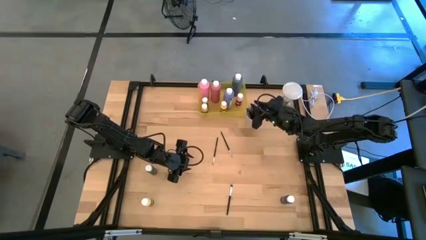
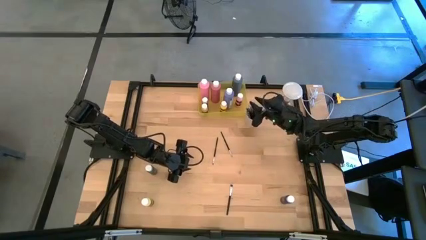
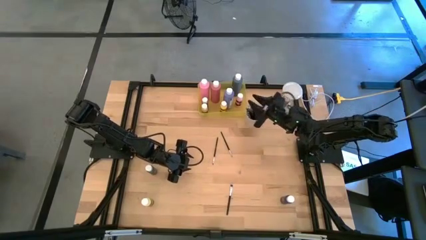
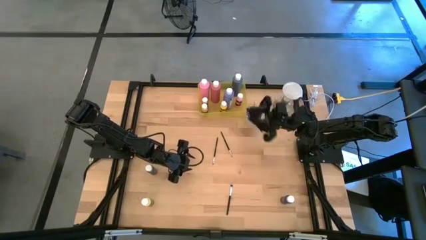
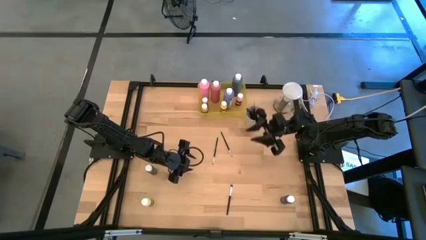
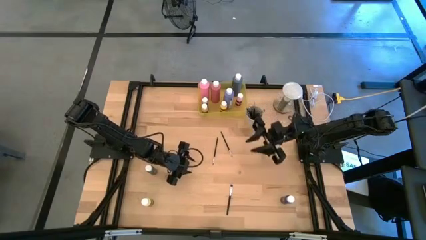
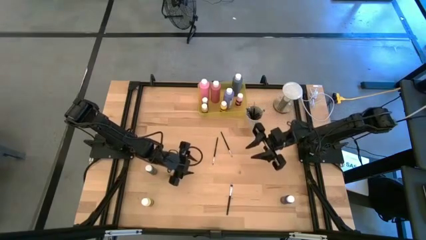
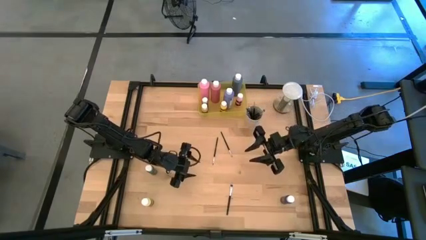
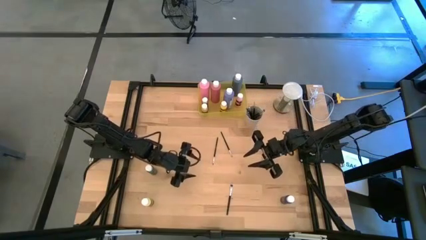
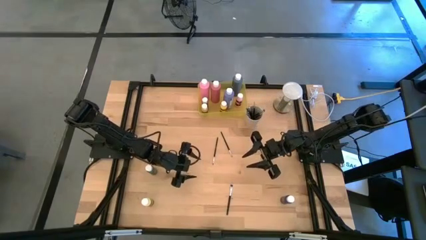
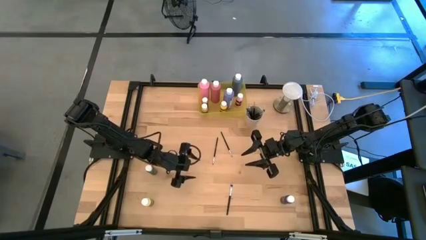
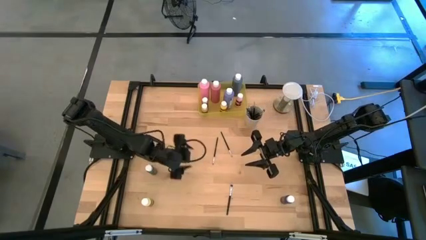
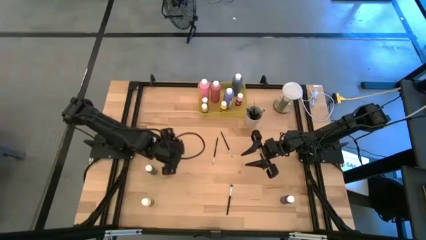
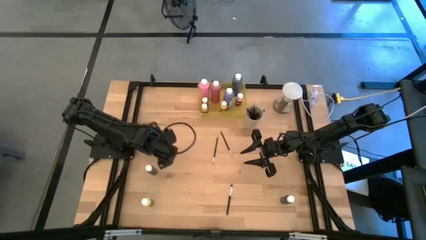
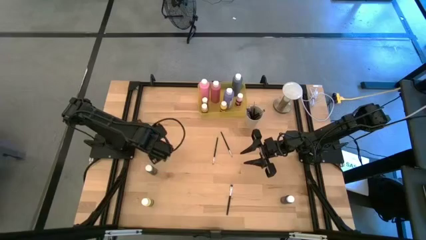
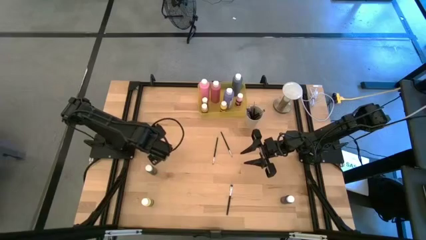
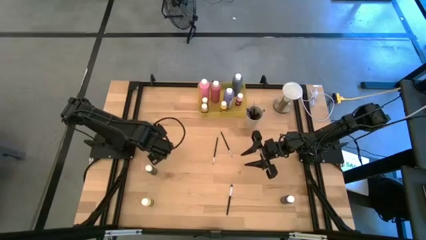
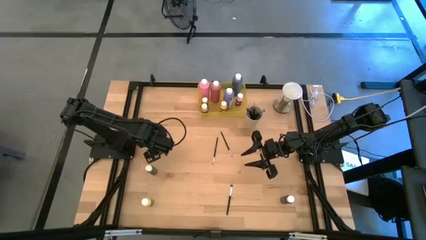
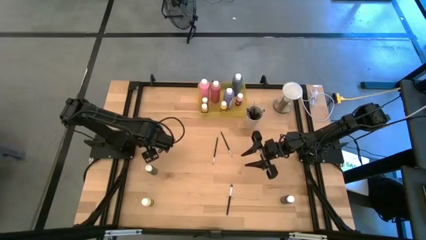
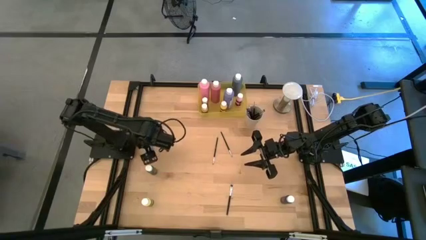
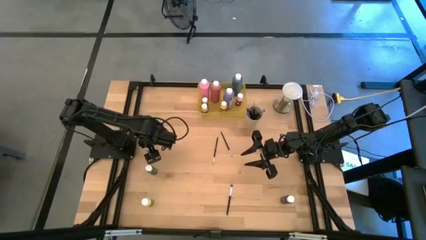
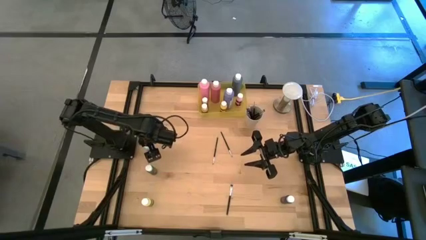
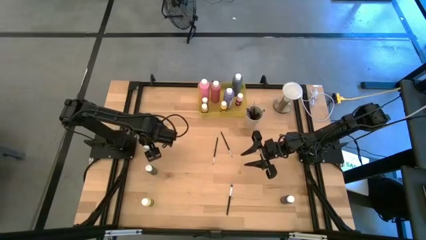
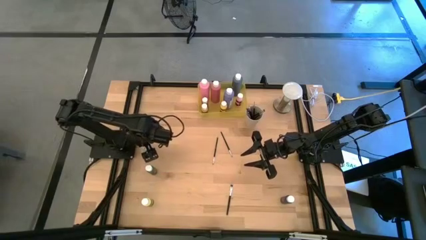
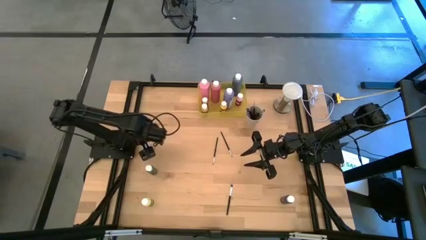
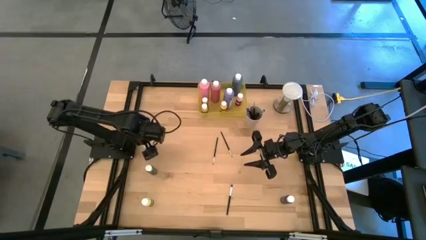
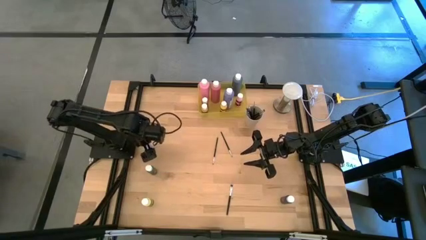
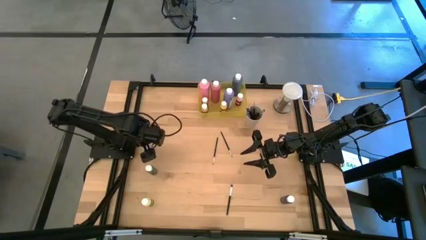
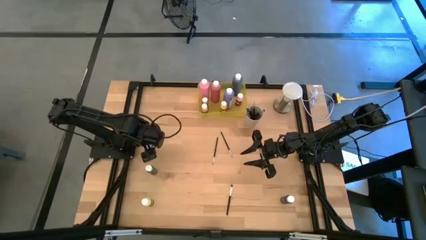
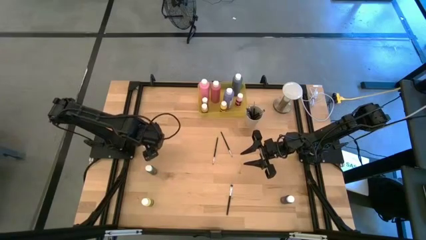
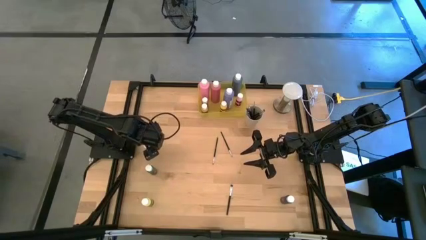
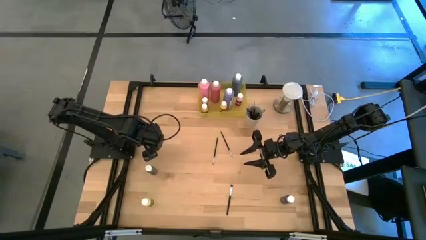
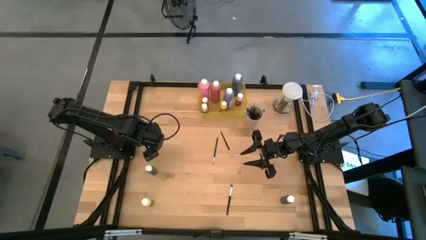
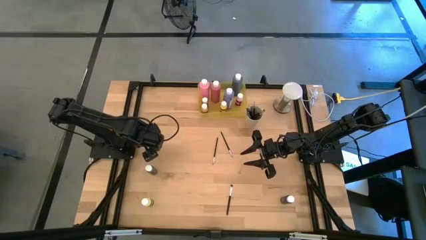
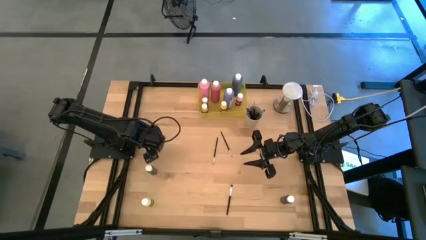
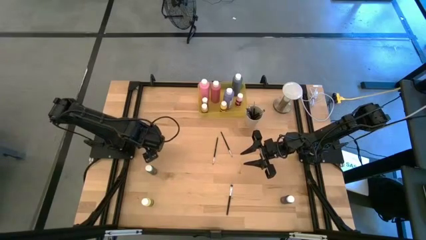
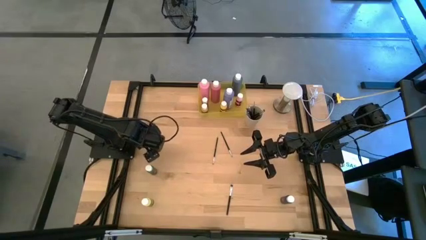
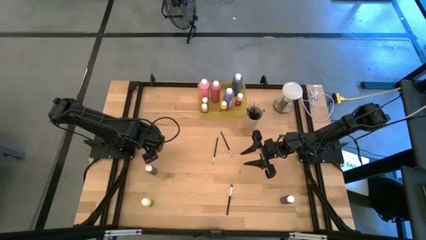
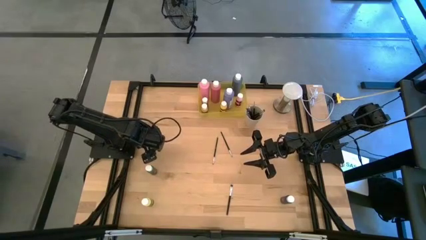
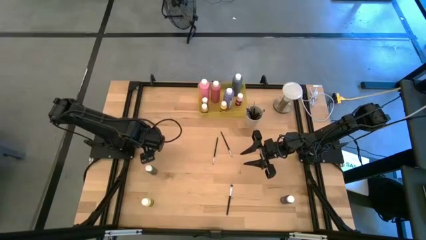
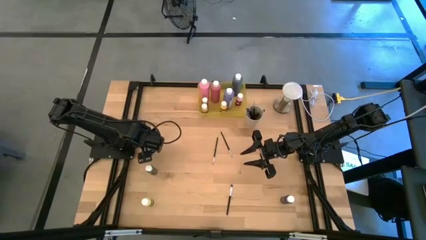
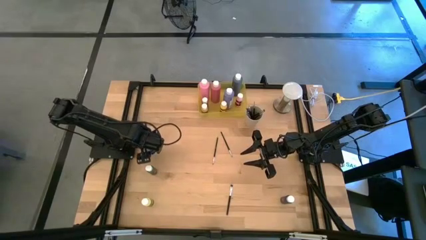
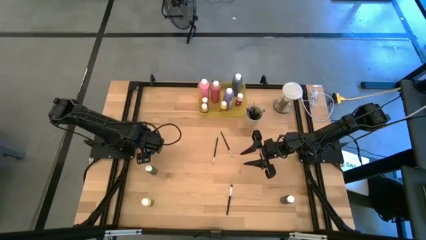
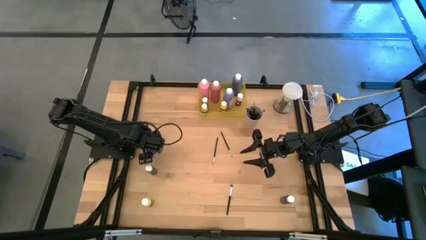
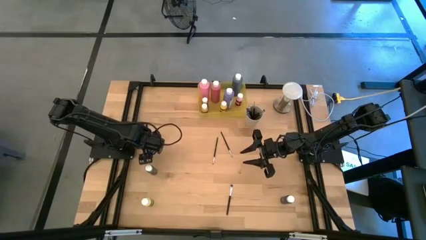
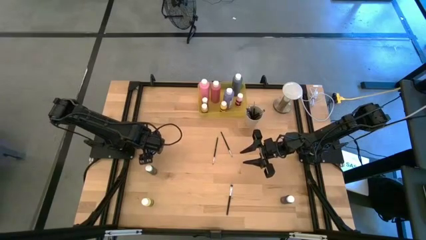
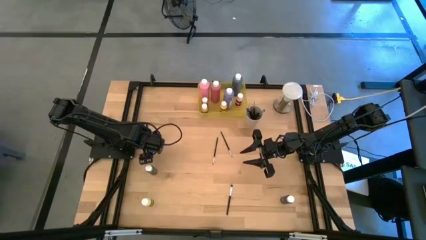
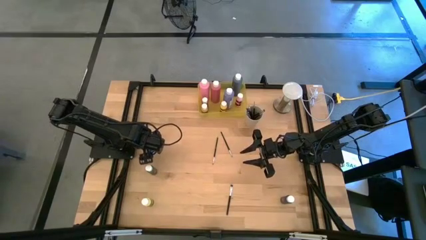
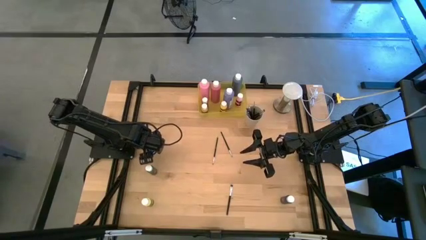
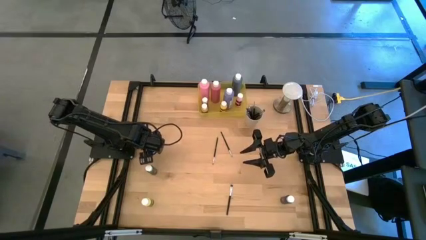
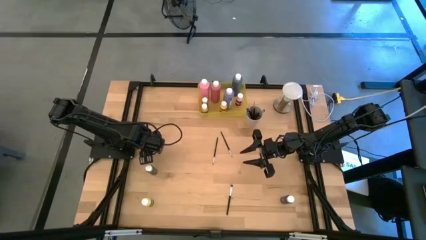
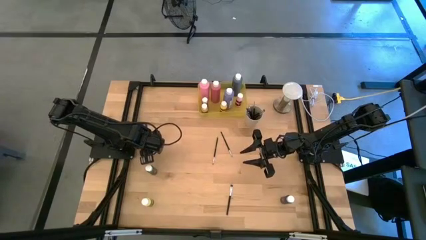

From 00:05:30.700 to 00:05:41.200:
Task: Pick & Place Paint Supplies
Put the small light blue paint bottle into the yellow bin

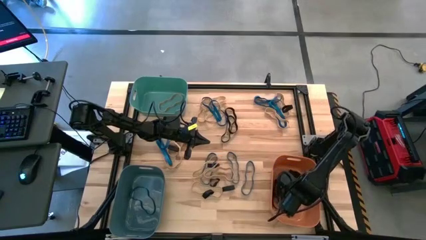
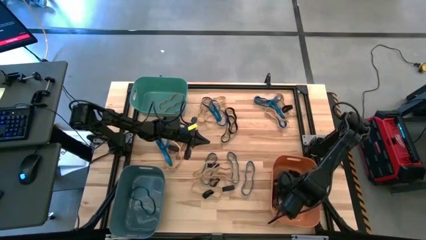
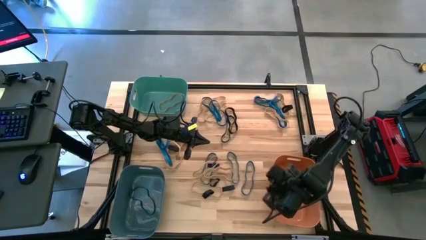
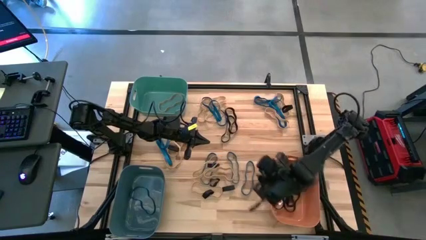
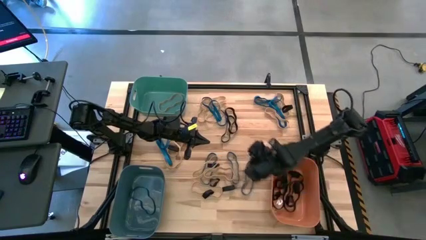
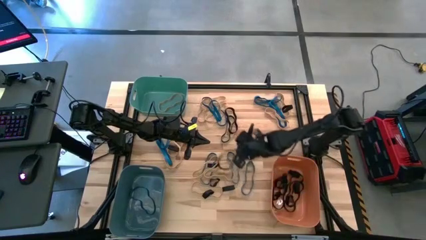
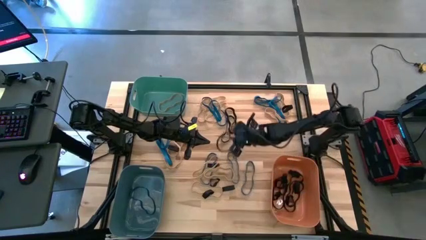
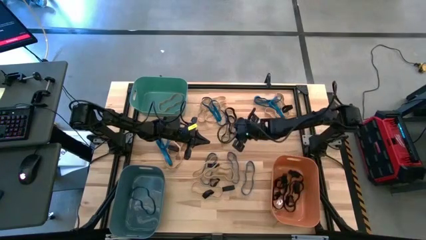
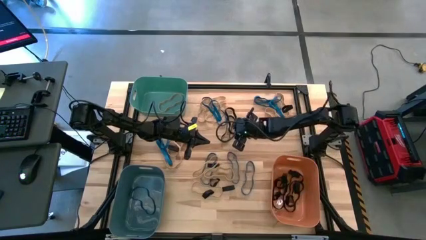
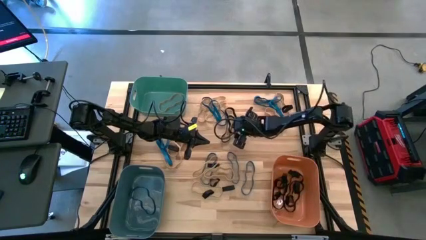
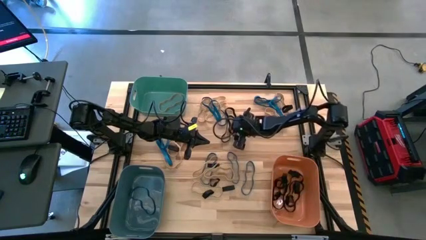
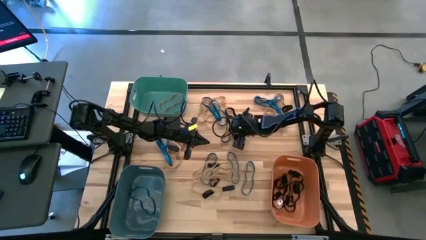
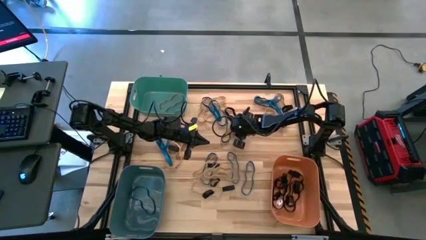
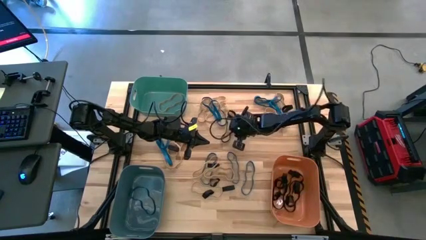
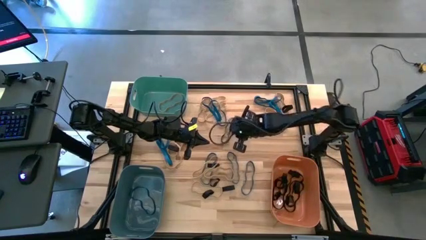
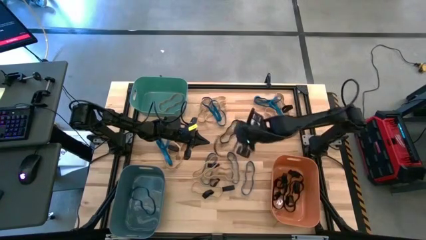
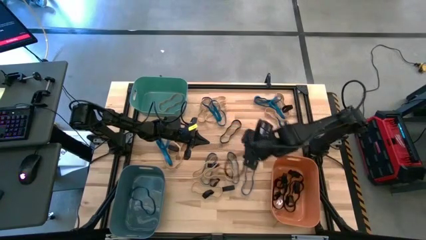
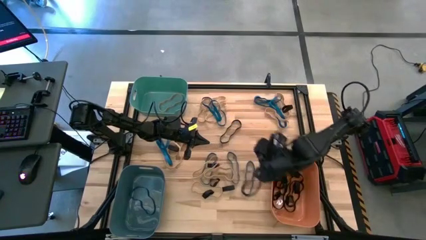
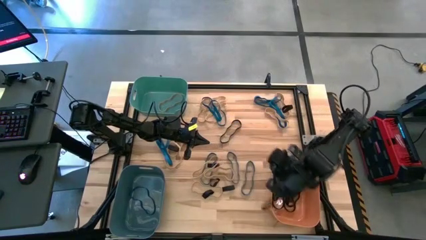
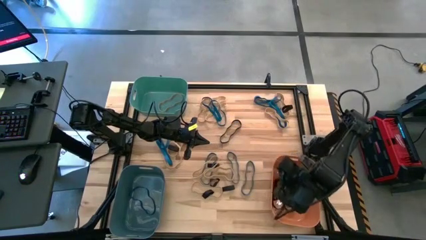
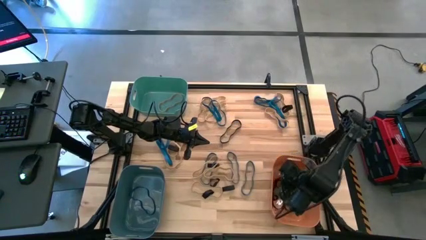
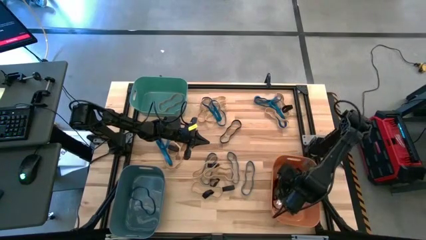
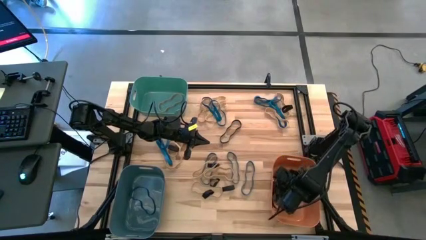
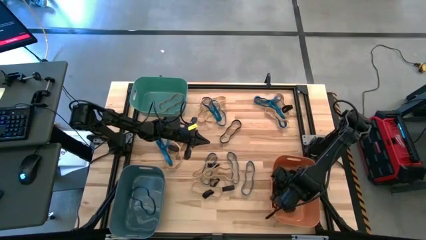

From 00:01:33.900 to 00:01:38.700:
Task: Sort rubber bands into baskets
Put the black rubber band into the orange bin

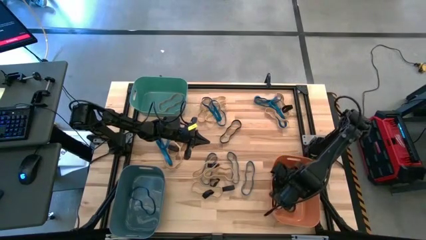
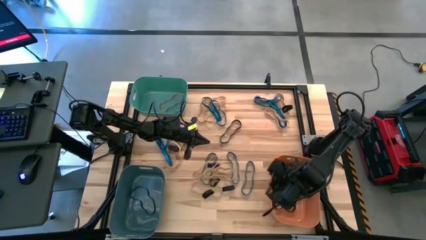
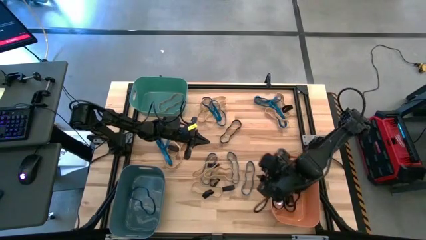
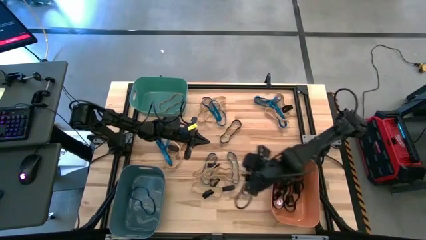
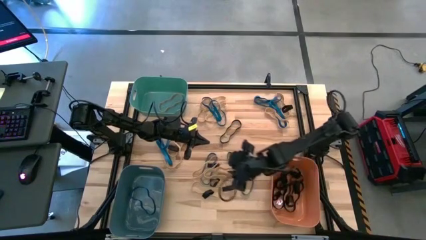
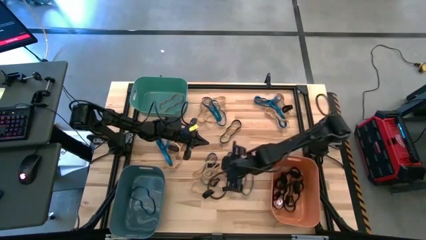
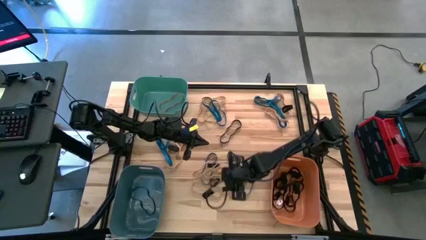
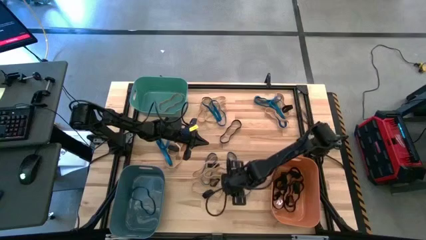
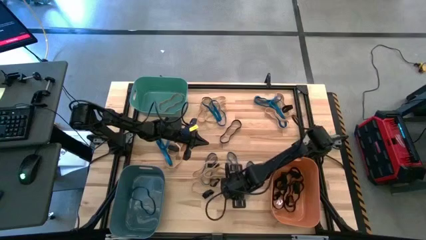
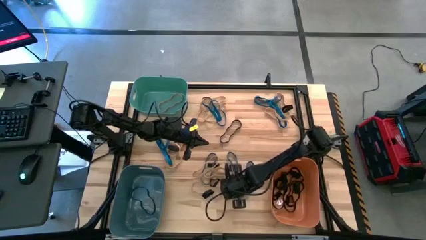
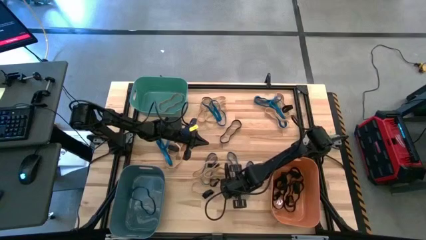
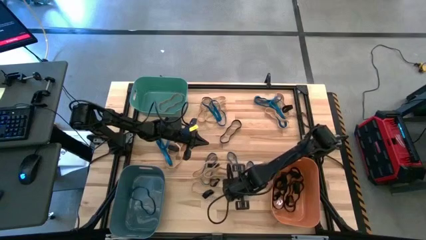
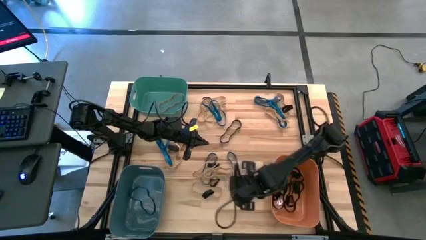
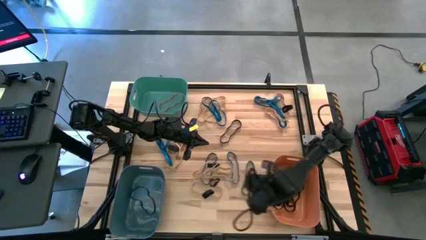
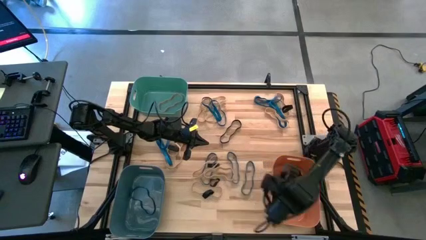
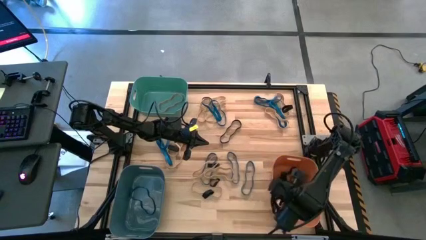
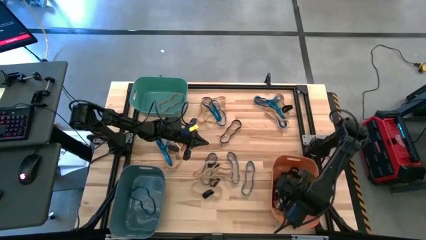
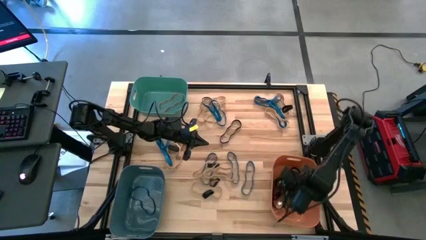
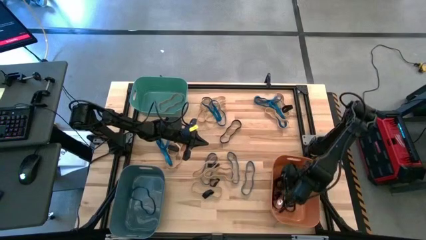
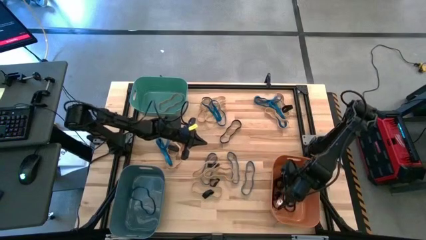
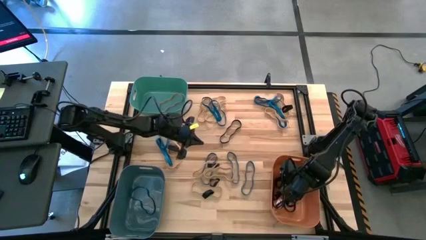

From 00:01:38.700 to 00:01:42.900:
Put the black rubber band into the orange bin
